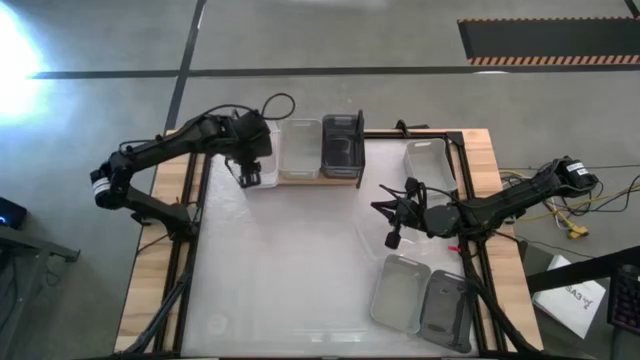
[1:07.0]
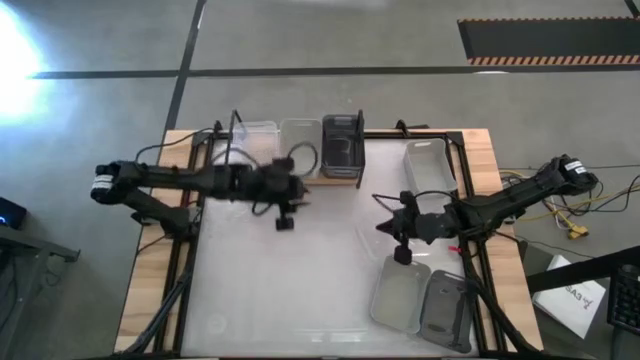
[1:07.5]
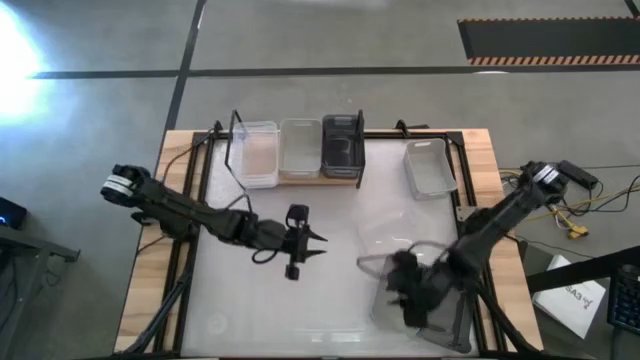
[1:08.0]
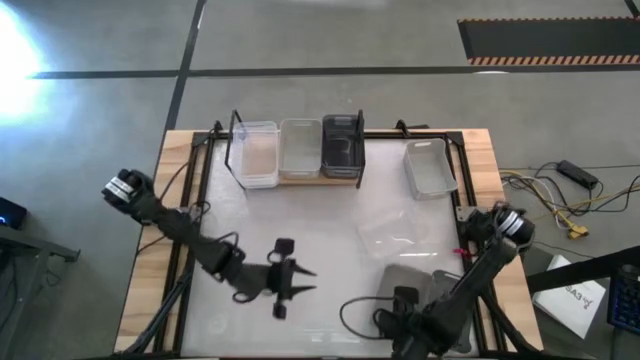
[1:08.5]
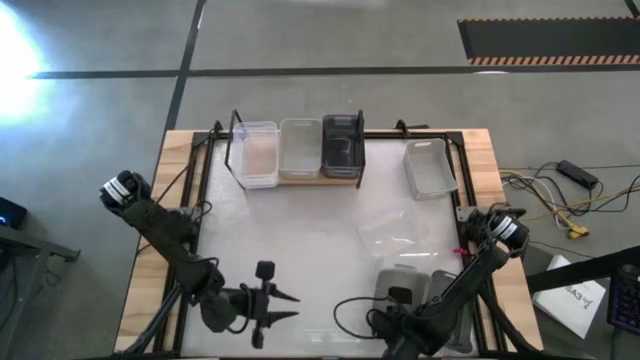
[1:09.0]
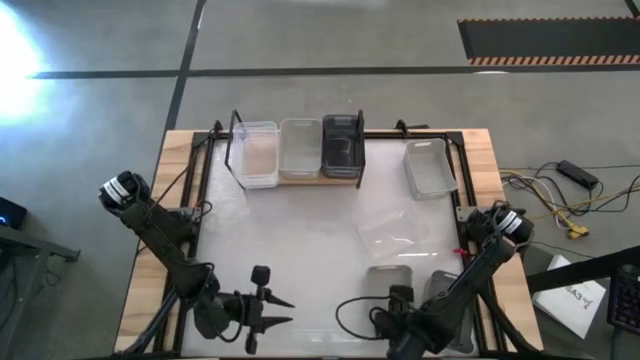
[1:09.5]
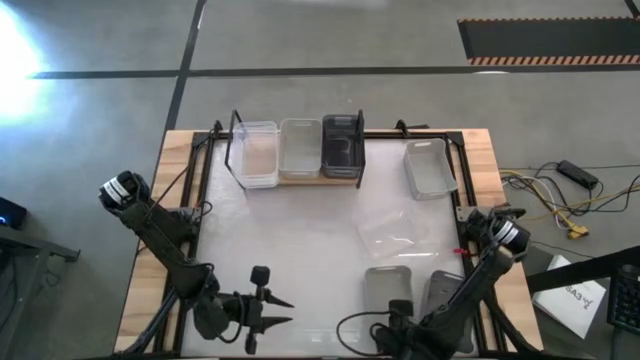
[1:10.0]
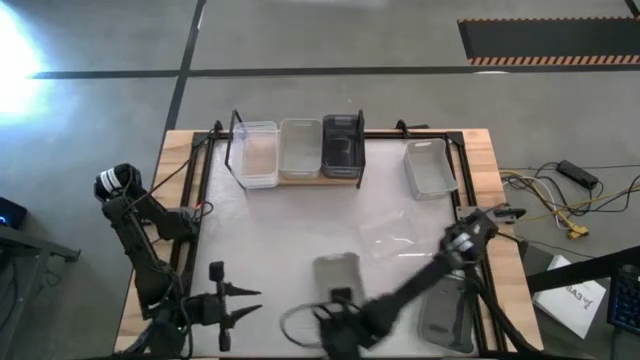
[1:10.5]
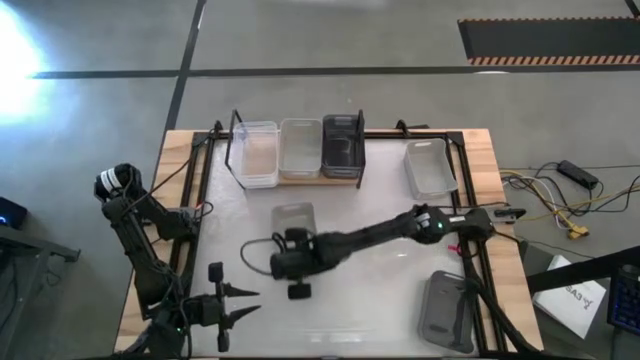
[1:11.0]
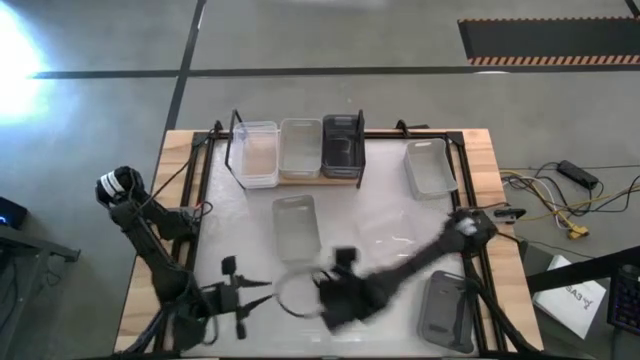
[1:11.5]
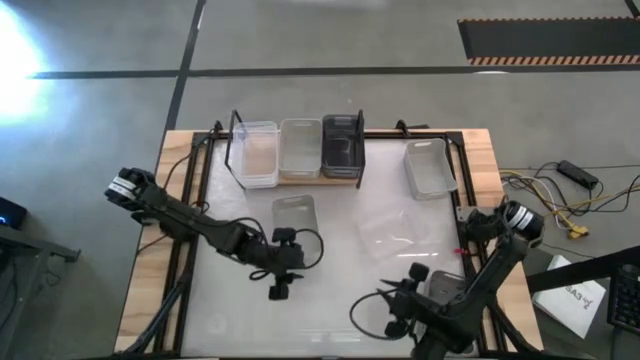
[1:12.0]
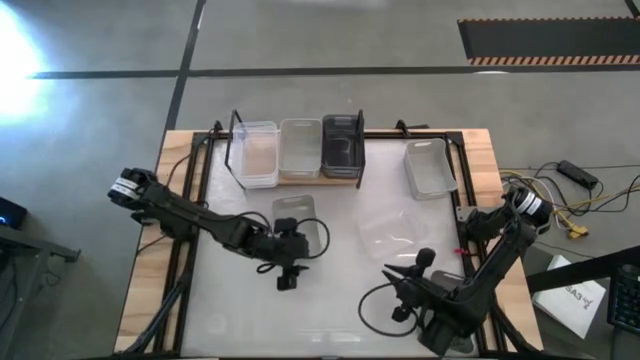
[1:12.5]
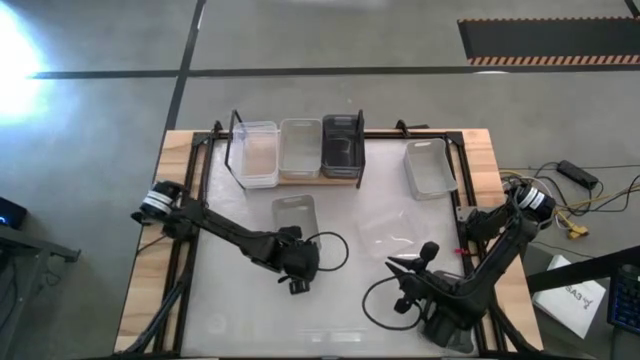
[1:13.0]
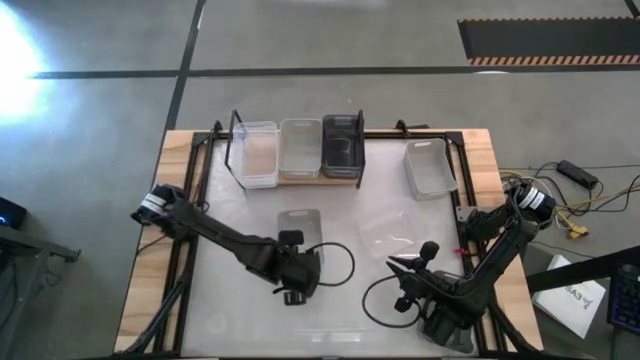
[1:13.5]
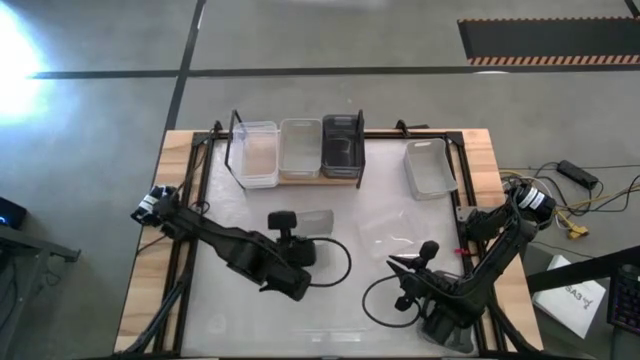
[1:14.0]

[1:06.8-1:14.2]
Task: Stack baskets on shelf by color
Stack the bottom gray bin on top of the gray bin on the shelf

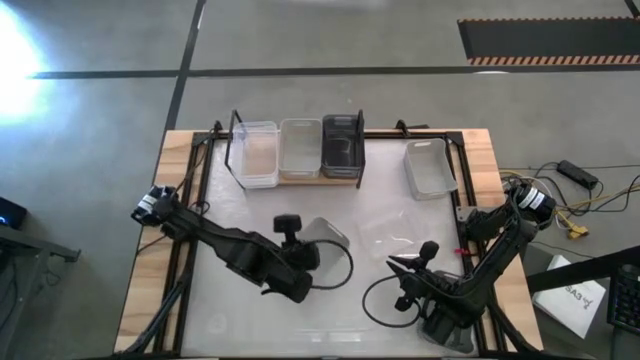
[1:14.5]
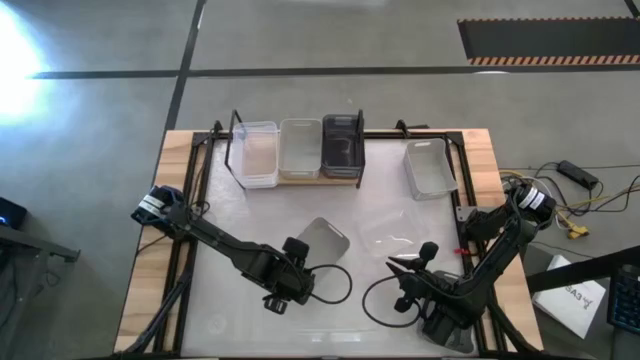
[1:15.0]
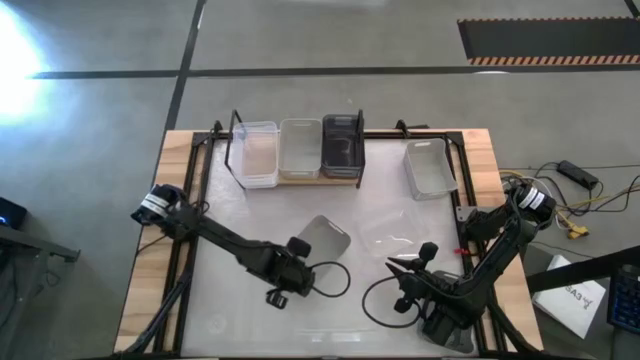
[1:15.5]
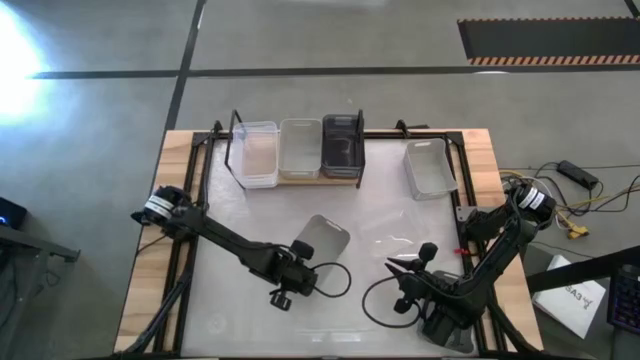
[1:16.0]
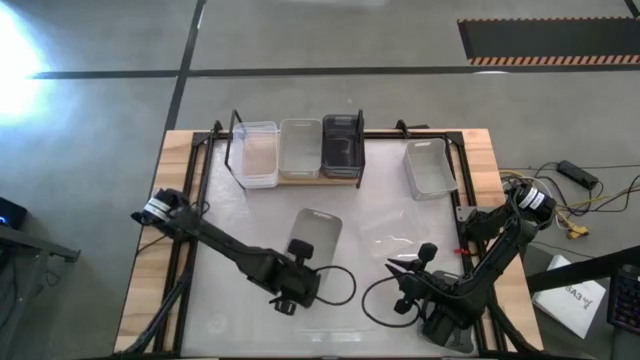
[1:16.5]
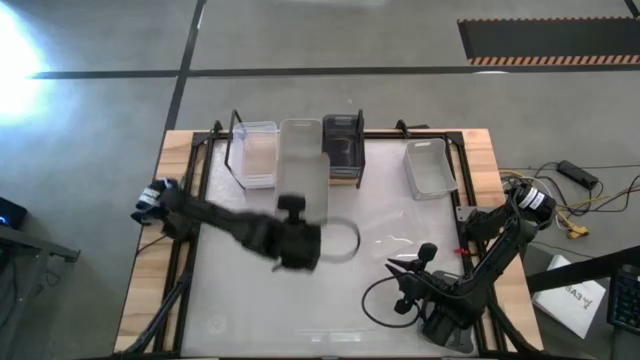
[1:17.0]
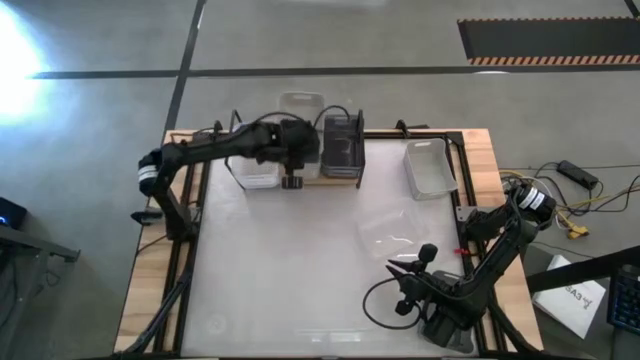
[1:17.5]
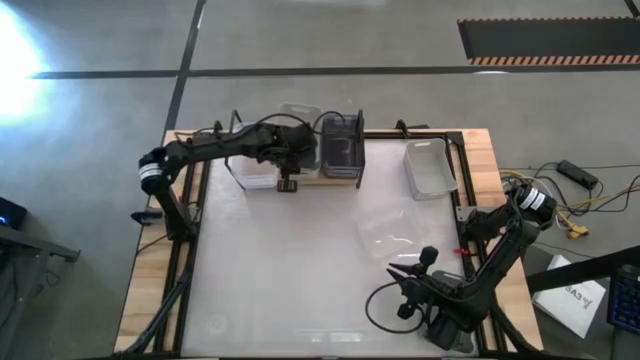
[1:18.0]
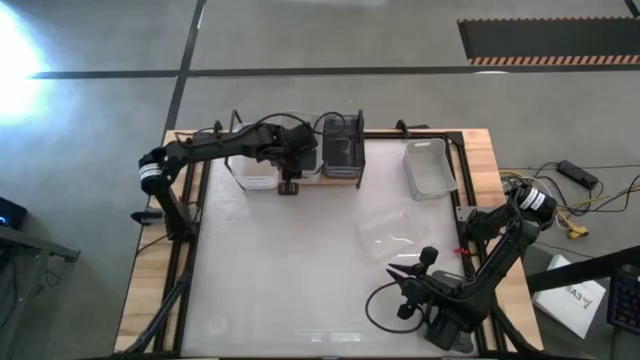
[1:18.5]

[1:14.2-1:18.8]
Stack the bottom gray bin on top of the gray bin on the shelf

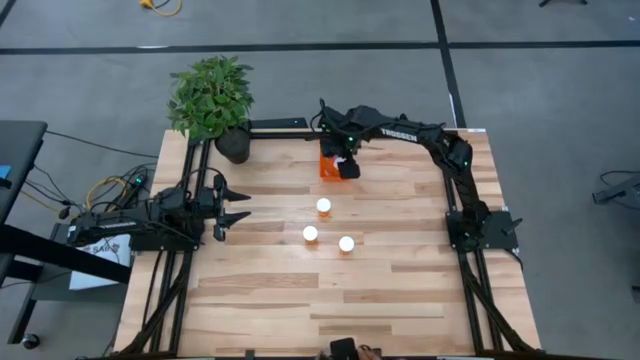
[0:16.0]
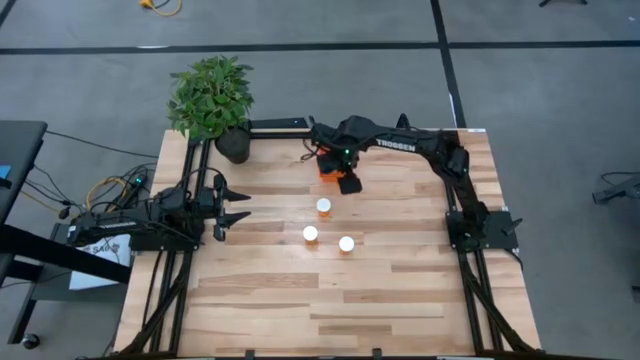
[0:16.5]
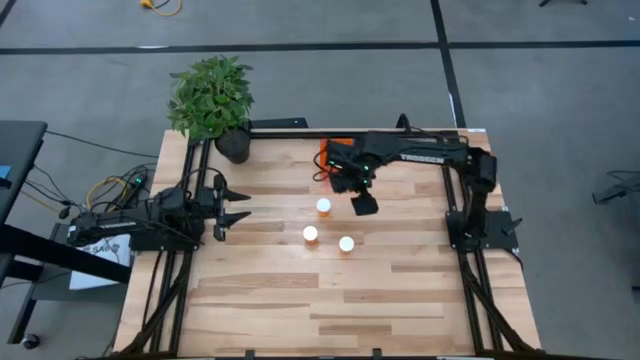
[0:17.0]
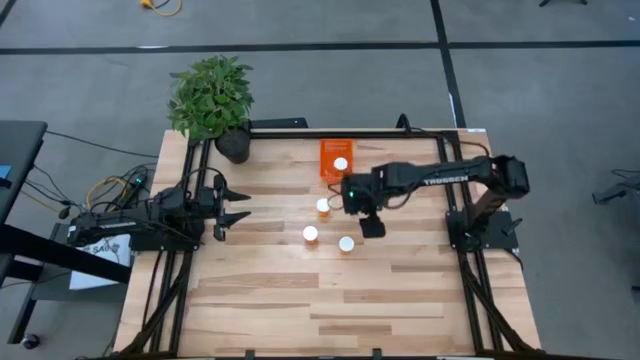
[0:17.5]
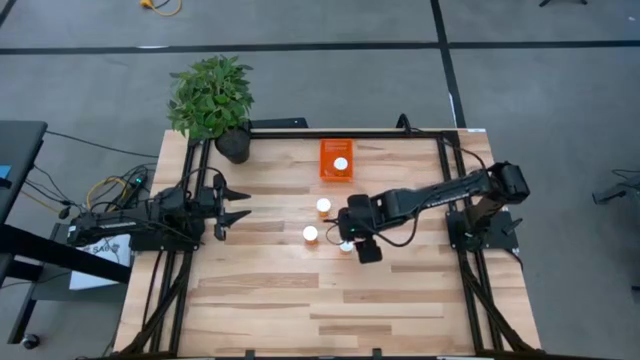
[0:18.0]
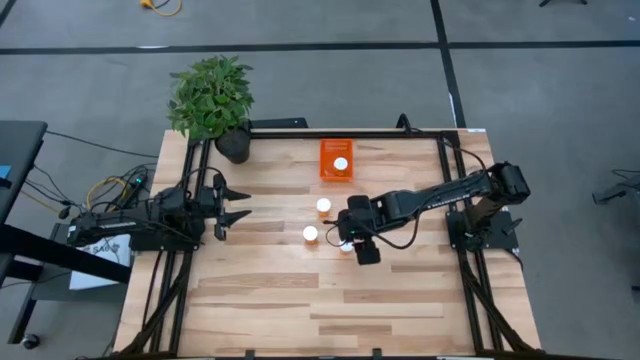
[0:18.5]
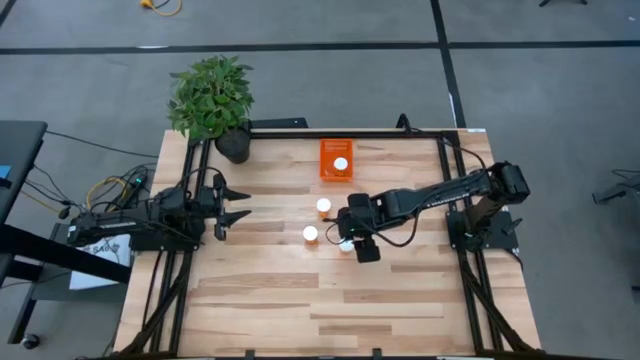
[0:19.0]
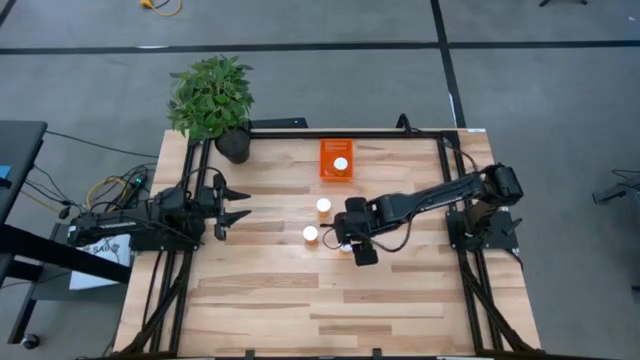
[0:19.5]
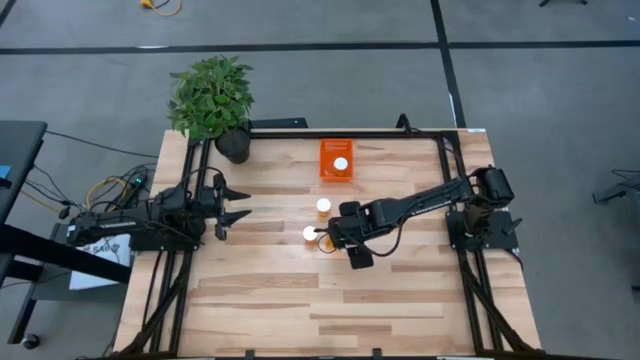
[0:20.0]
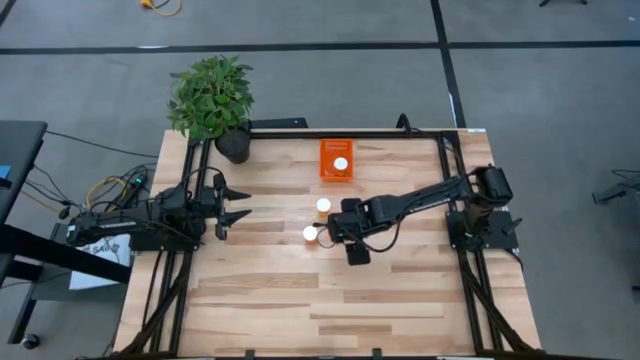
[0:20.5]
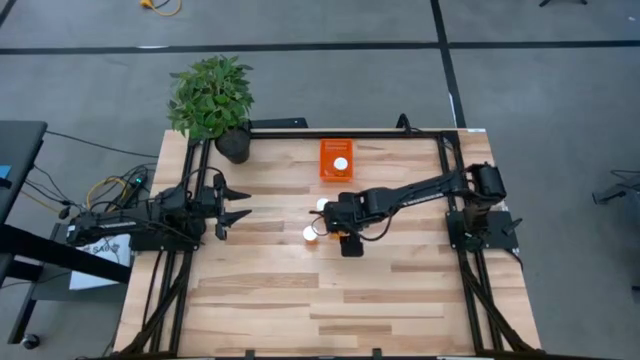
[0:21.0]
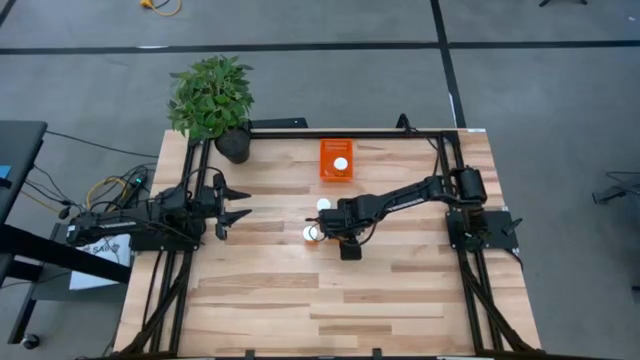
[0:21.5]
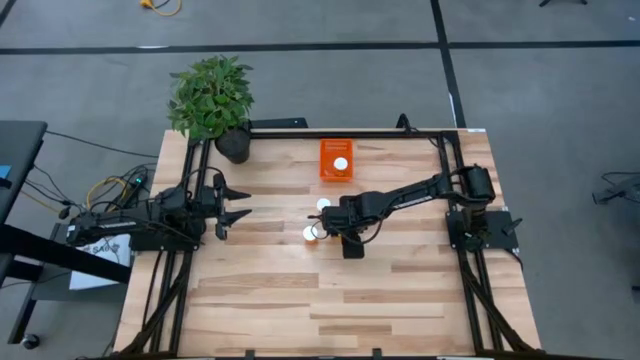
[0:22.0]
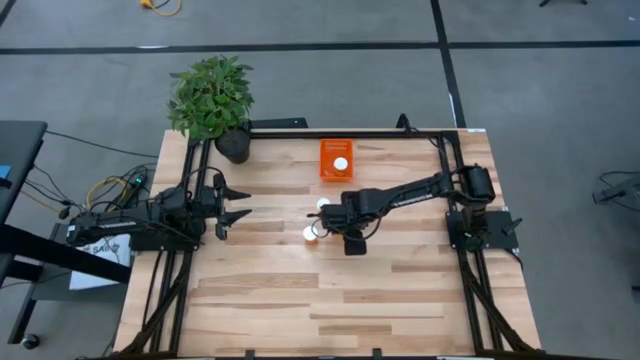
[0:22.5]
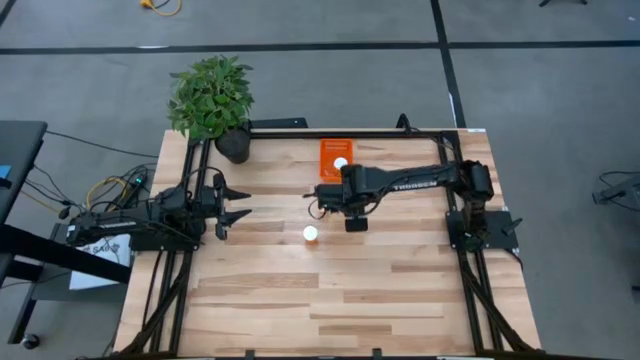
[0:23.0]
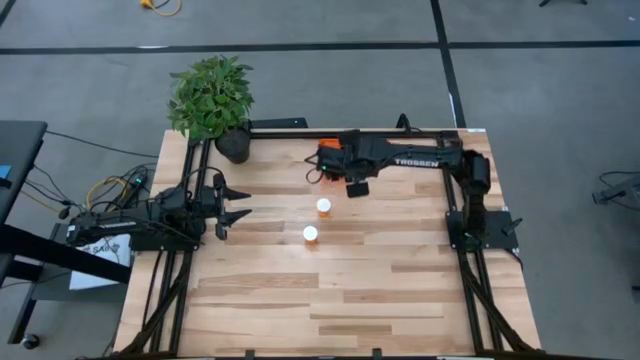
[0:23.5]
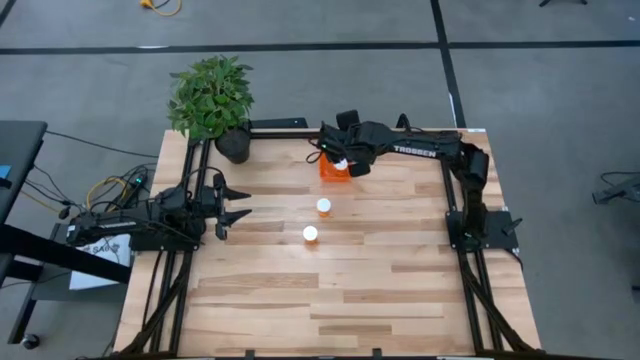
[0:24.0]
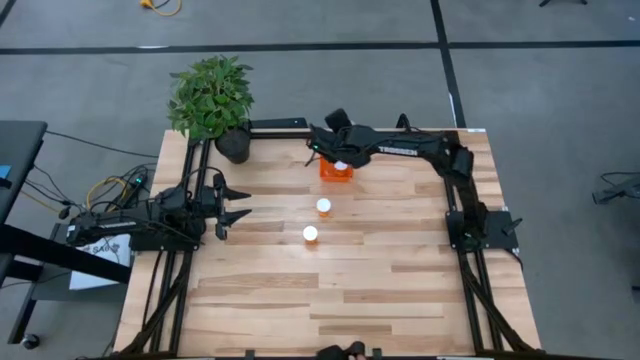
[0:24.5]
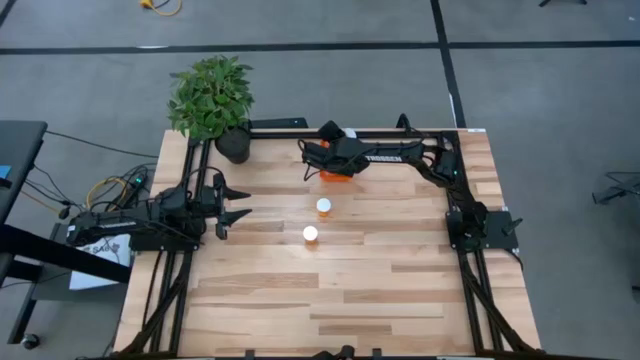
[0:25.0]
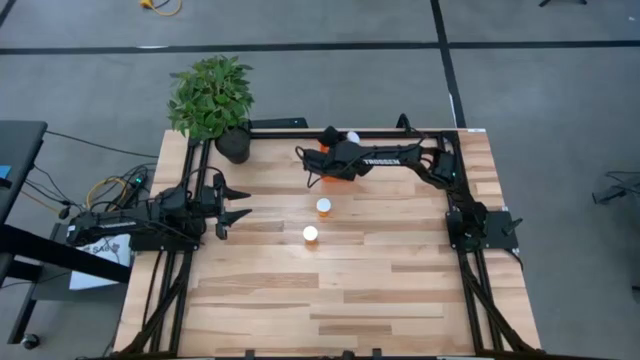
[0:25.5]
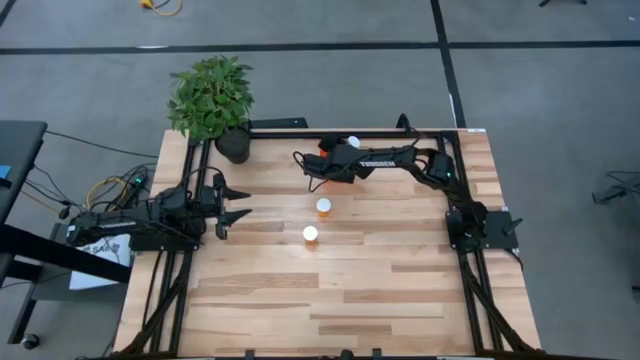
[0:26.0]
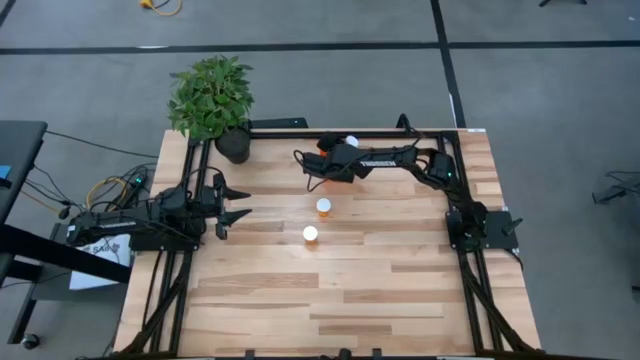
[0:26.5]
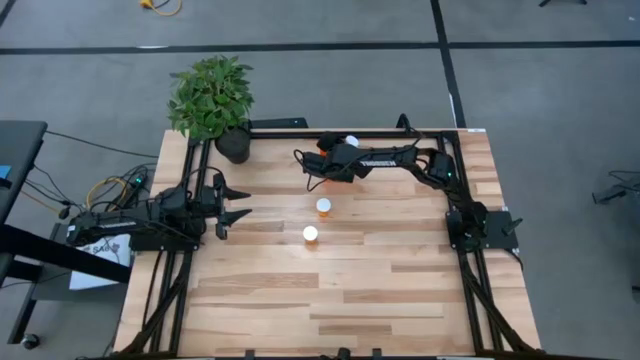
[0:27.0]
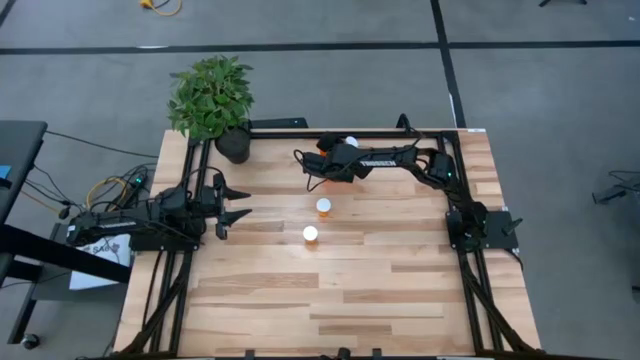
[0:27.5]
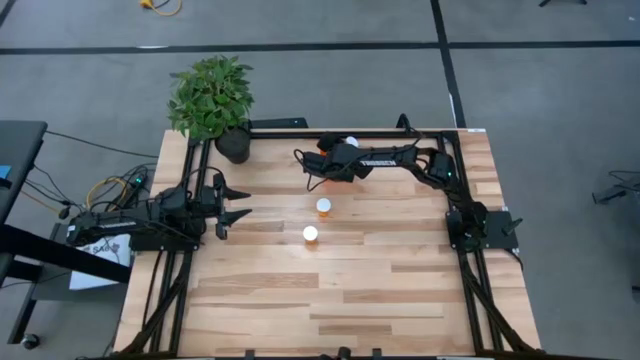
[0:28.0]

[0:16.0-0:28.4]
Task: Pick and place pill bottles into a basket
Put the orange pill bottle into the orange basket
